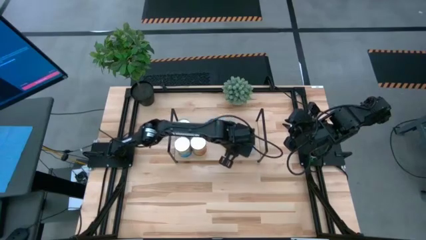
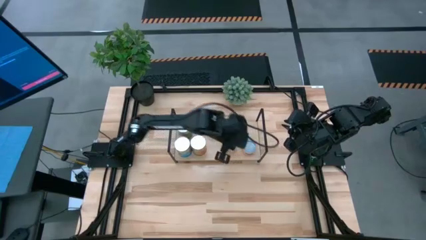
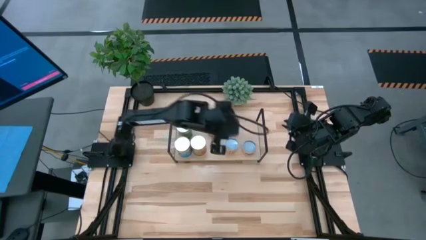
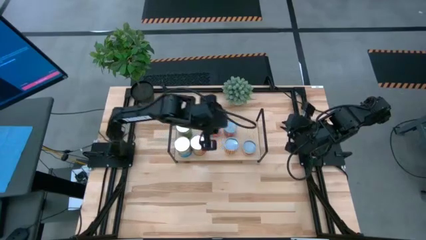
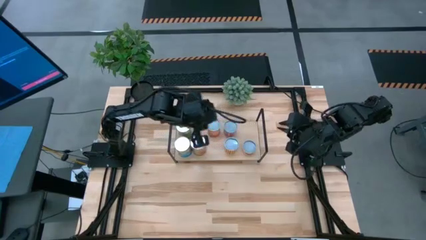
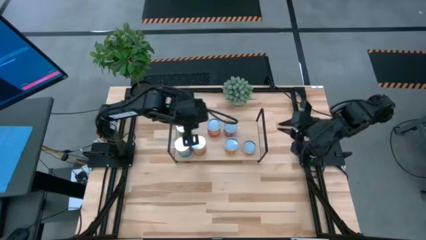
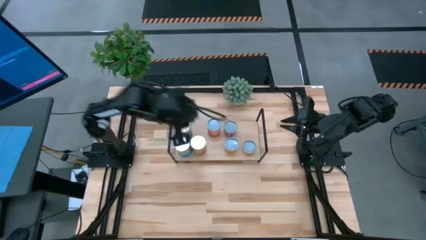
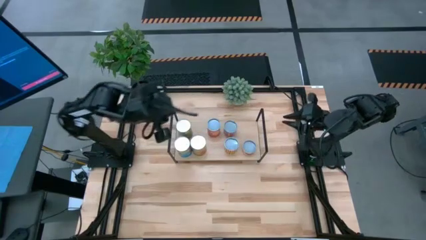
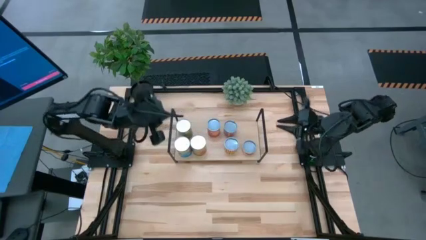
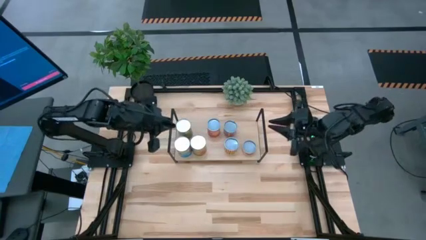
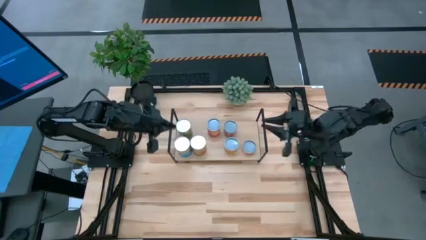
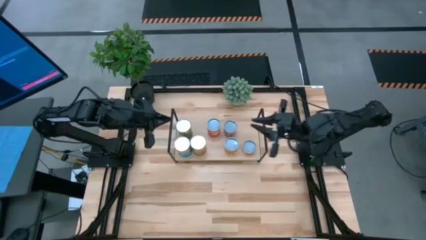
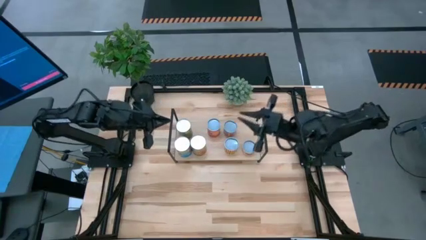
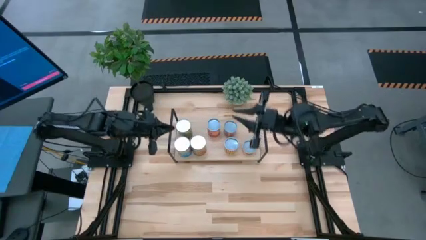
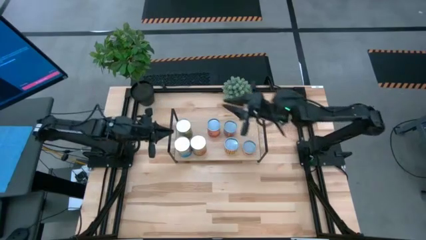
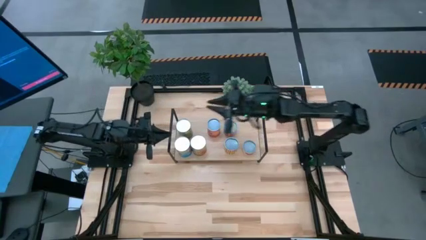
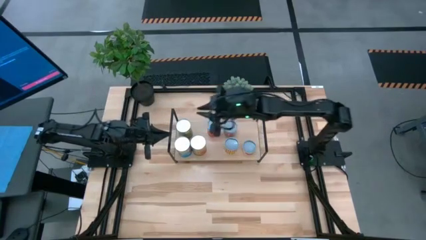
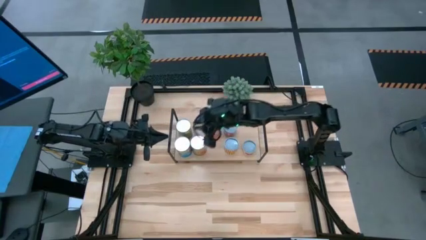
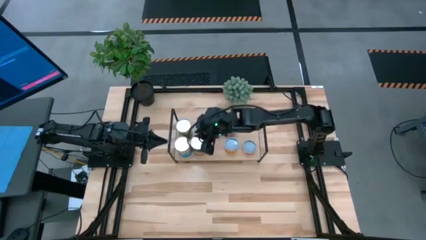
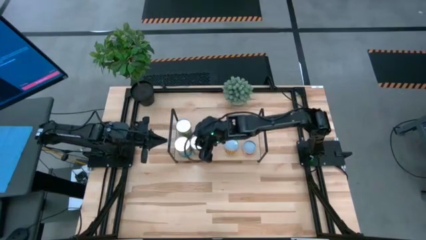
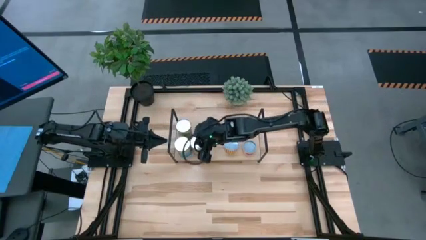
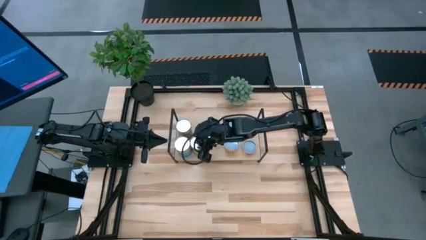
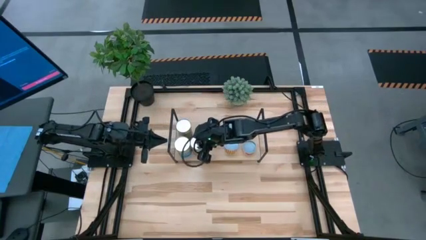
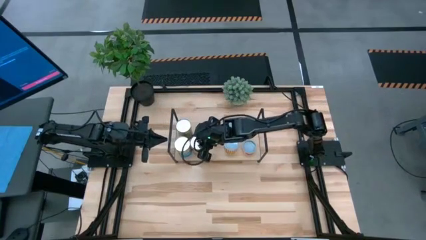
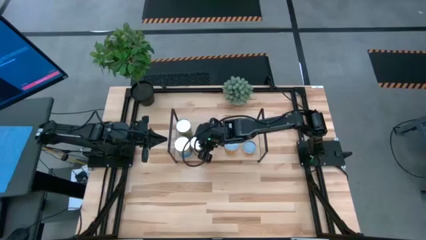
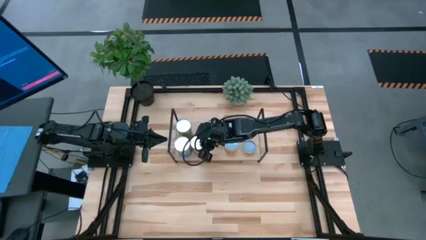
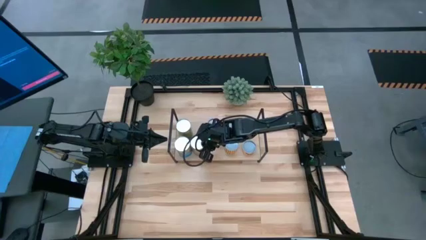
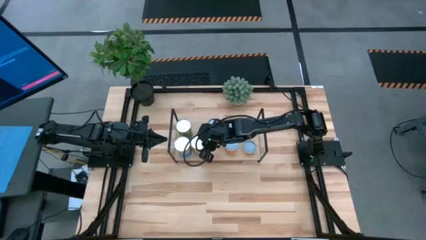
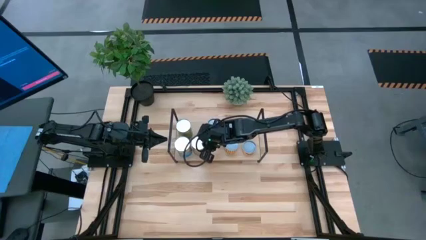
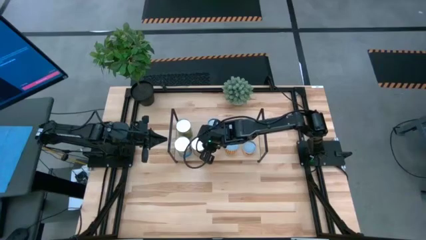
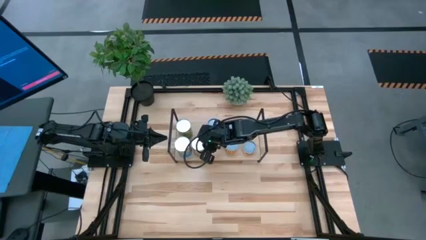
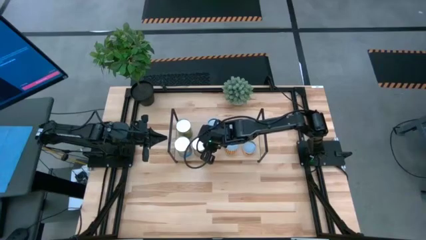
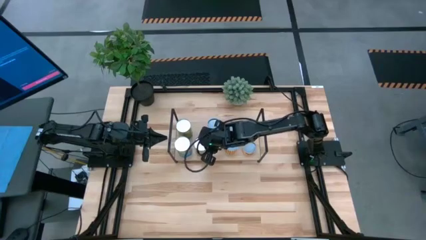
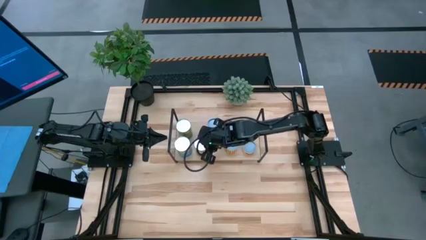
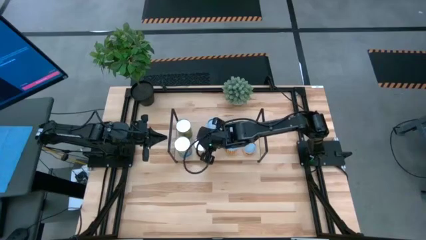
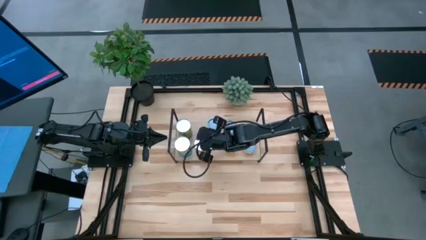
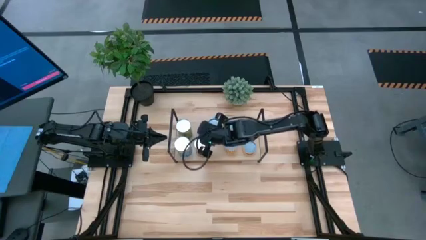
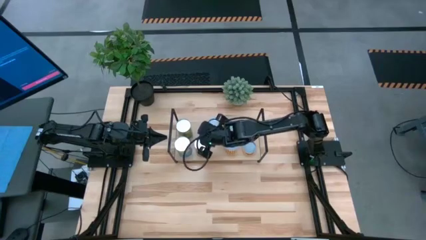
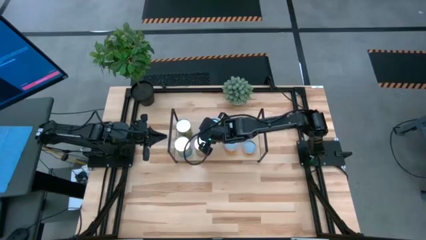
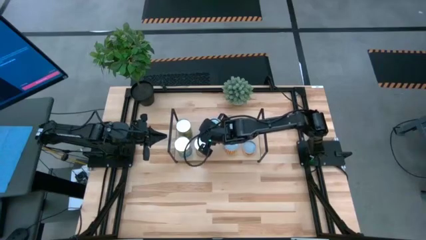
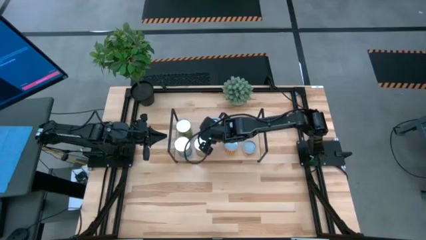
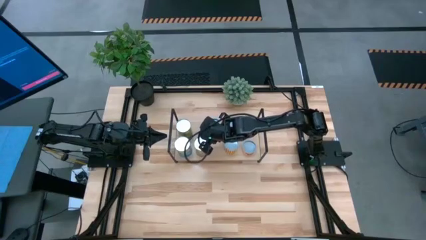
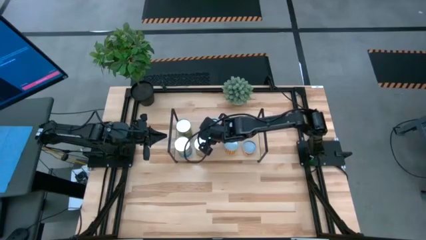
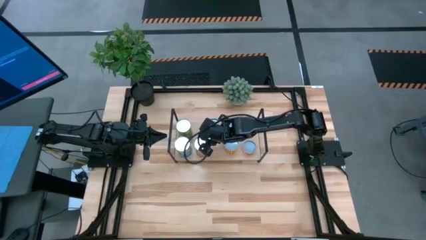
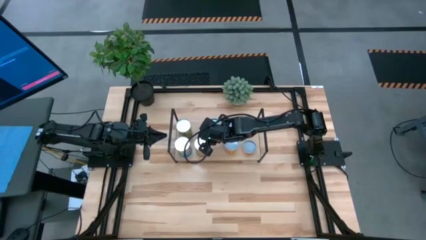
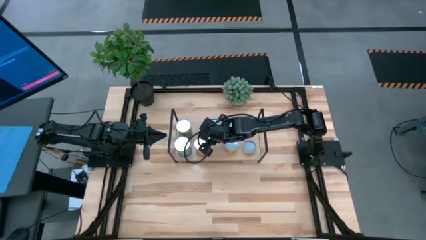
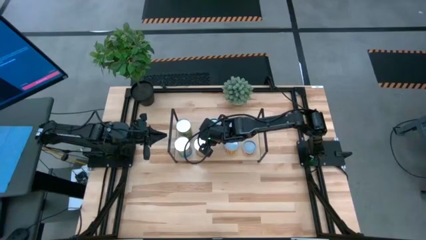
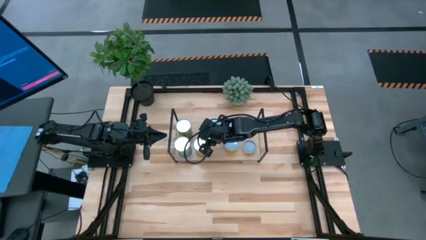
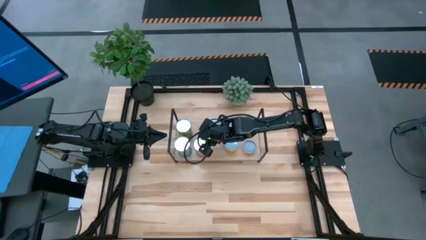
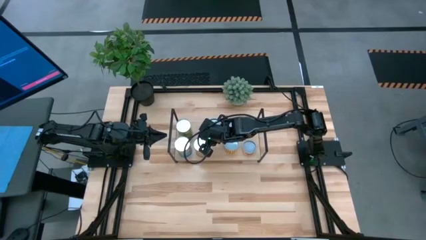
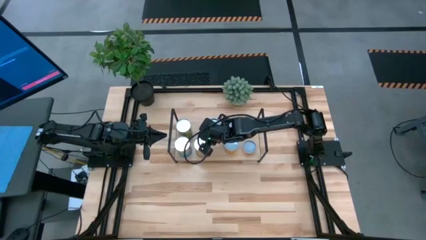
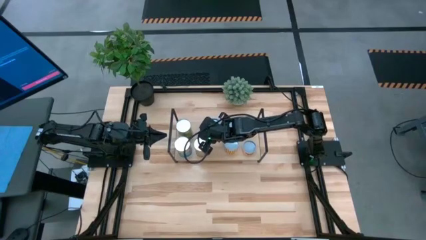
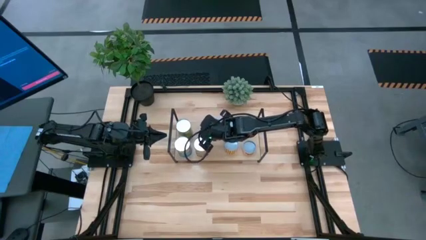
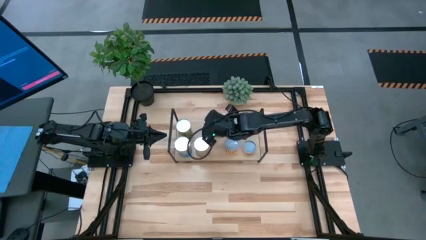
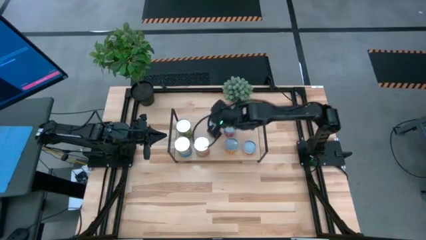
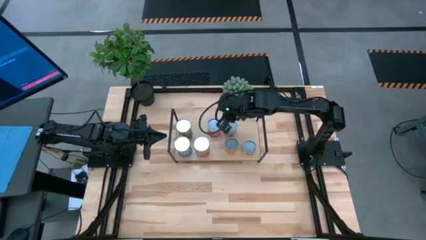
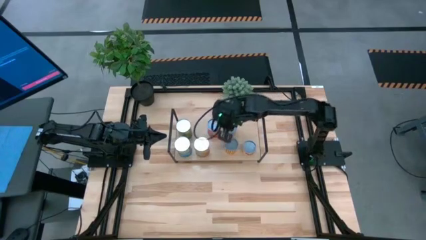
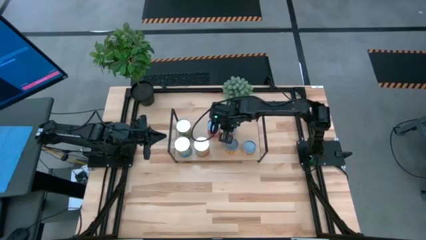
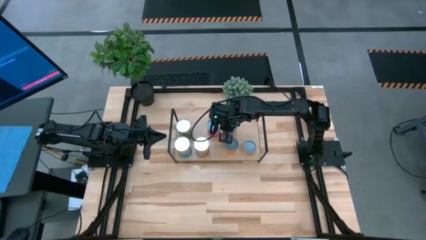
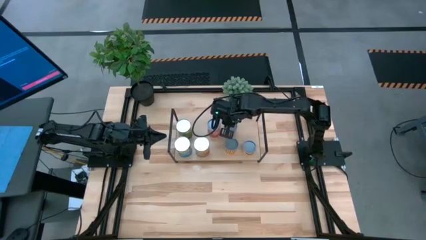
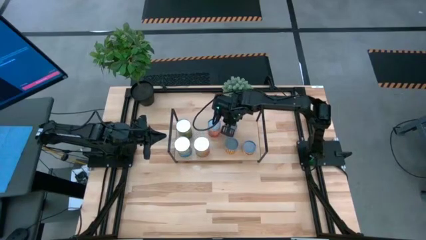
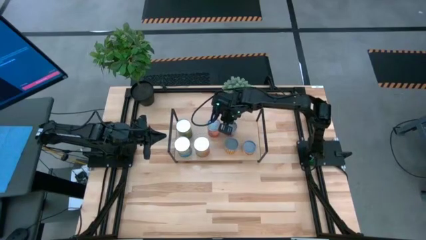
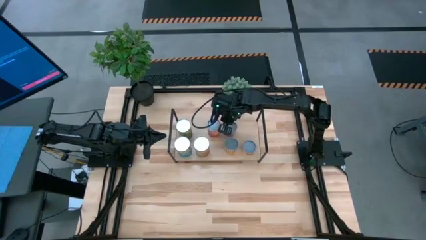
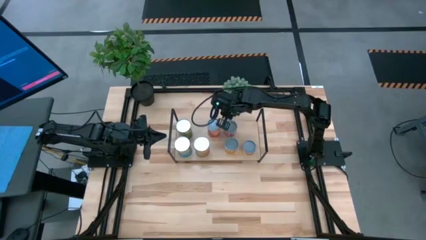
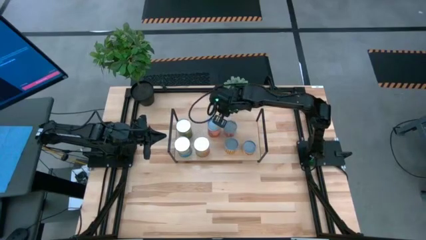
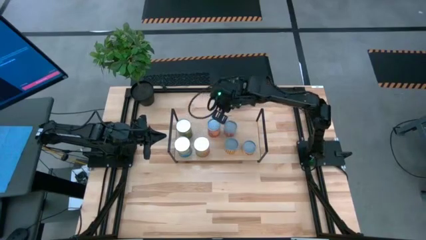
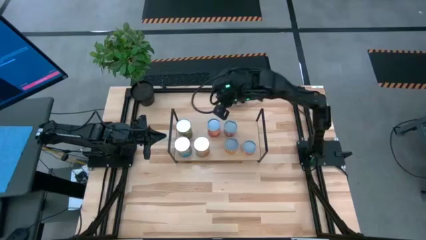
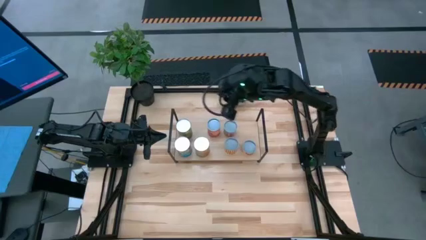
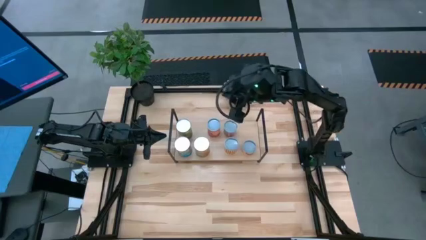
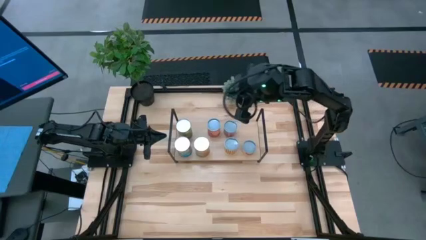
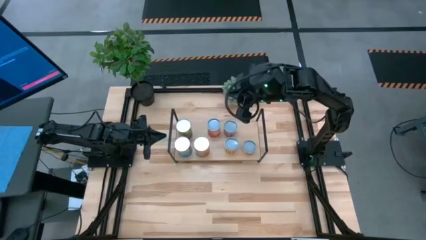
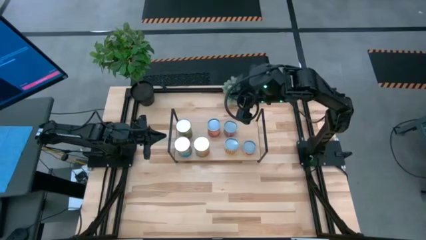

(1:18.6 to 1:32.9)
Task: Pick and place cans onto a shelf
Adjust the canned fruits and vegetables on the shelf
